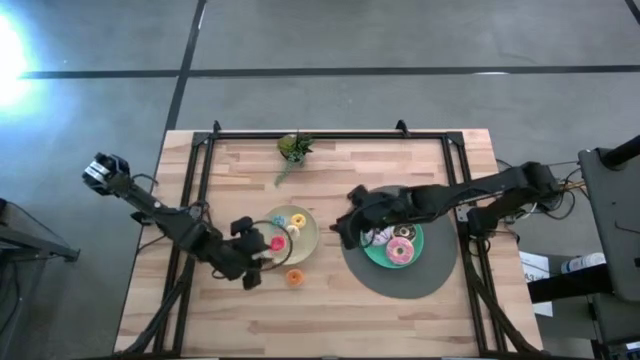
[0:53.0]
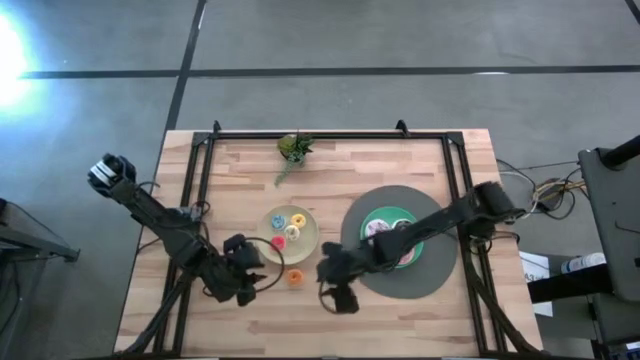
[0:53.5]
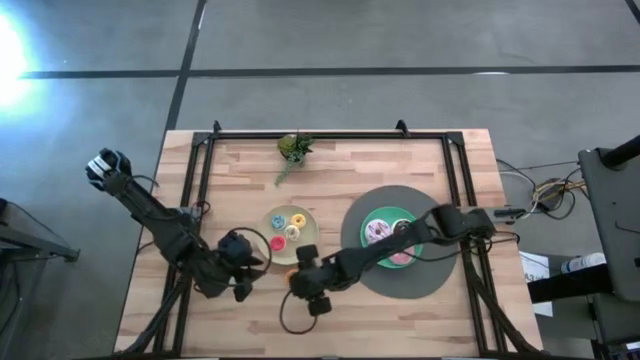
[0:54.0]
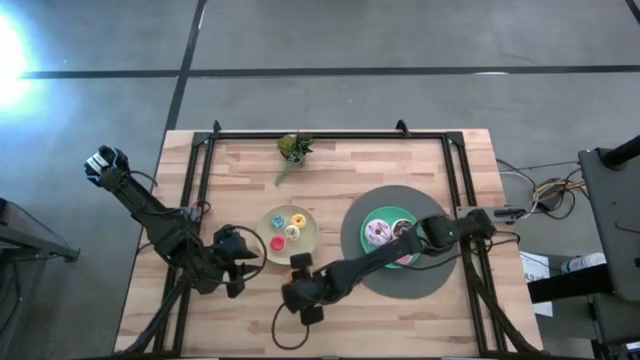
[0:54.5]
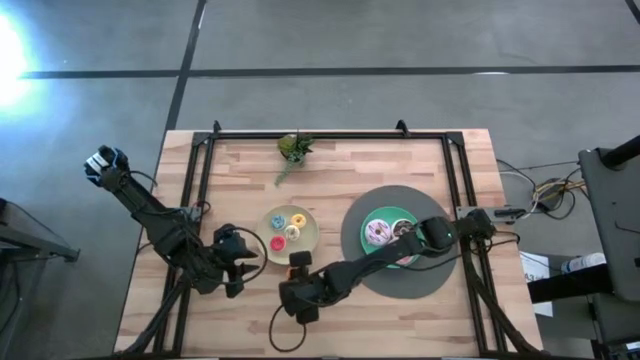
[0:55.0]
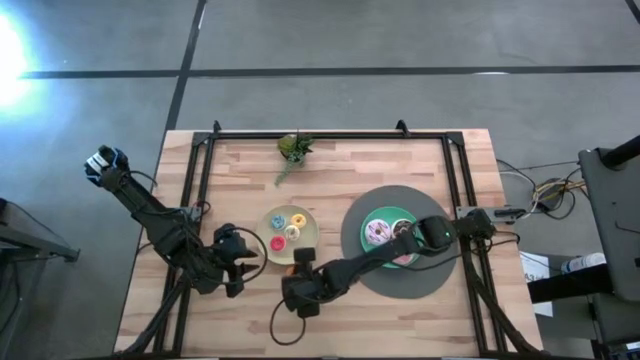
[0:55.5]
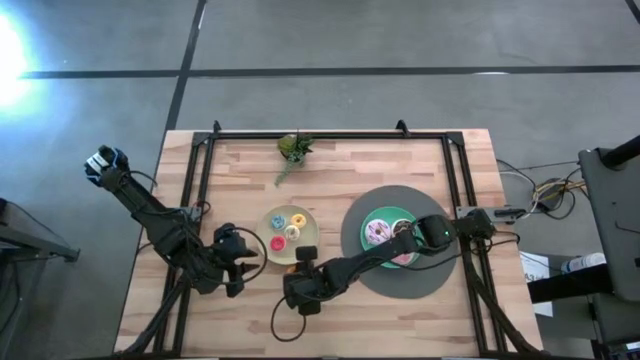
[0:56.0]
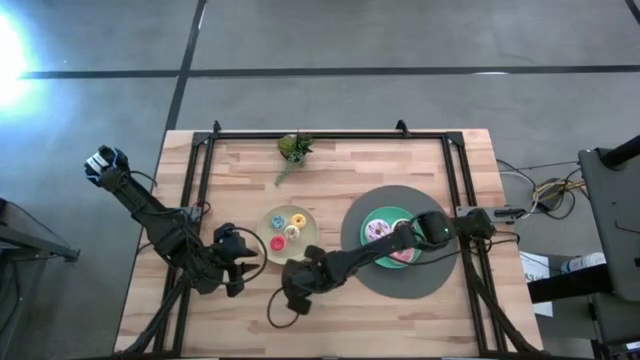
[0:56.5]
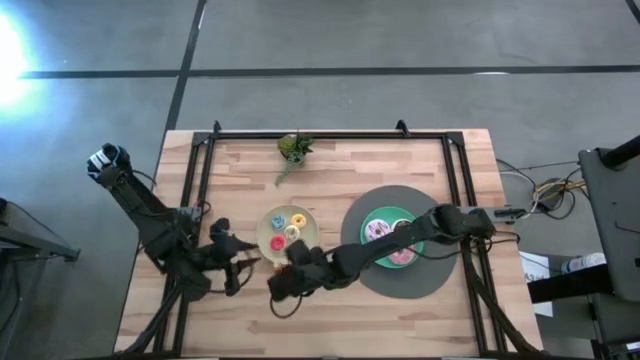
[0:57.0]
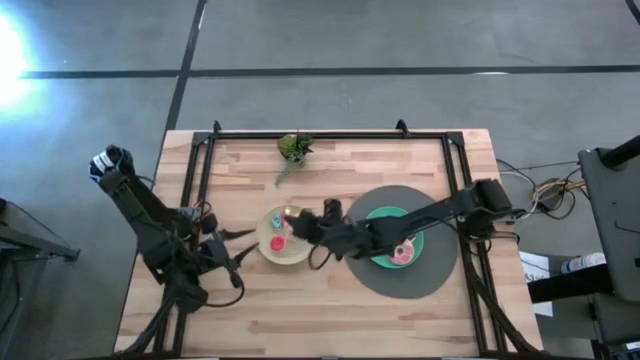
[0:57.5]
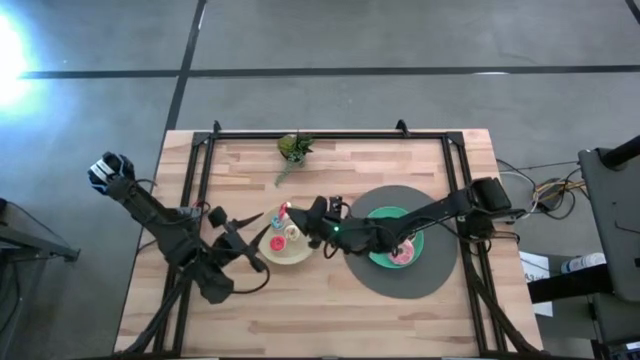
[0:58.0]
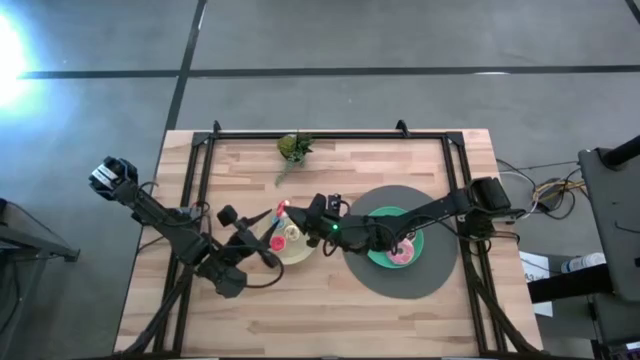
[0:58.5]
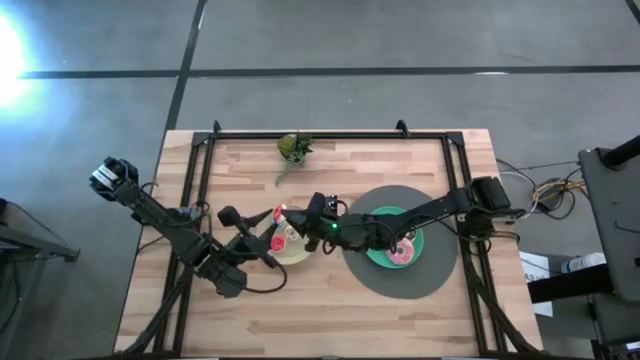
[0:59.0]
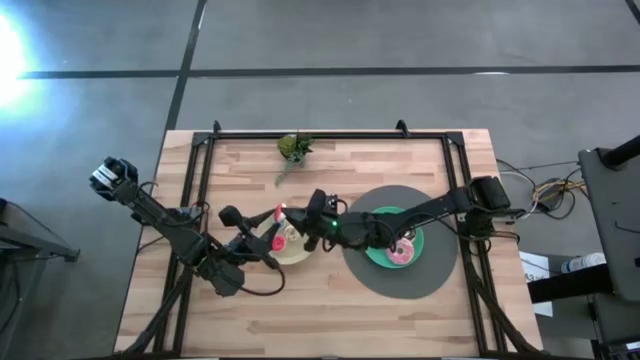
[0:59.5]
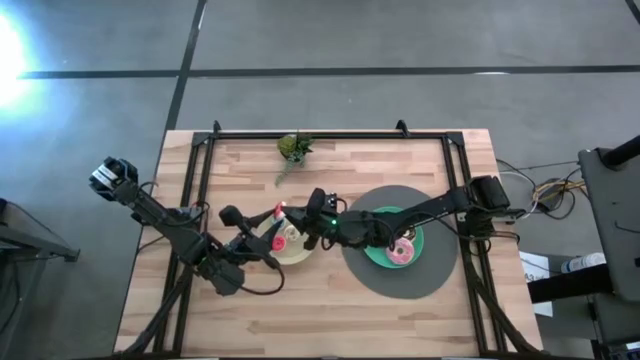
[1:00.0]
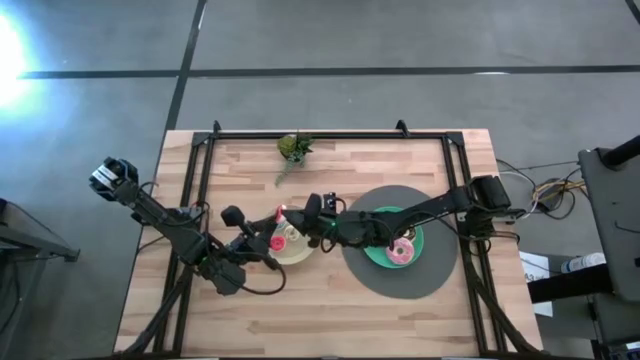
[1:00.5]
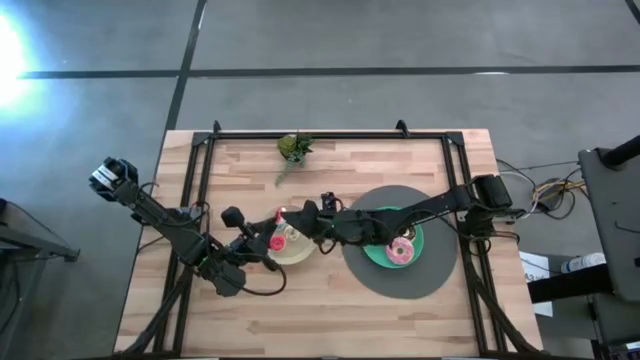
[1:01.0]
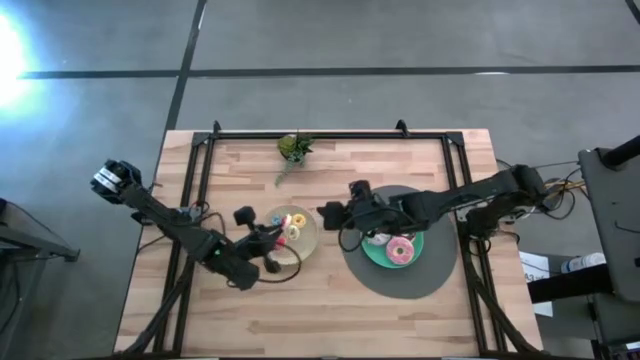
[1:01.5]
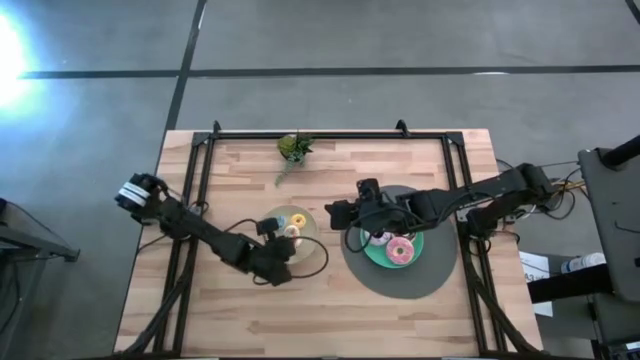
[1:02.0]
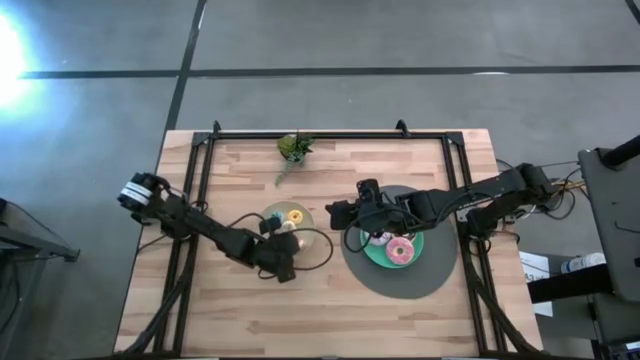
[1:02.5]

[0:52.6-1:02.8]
Task: Pick & Place donuts
Put the small orange donut on the white plate

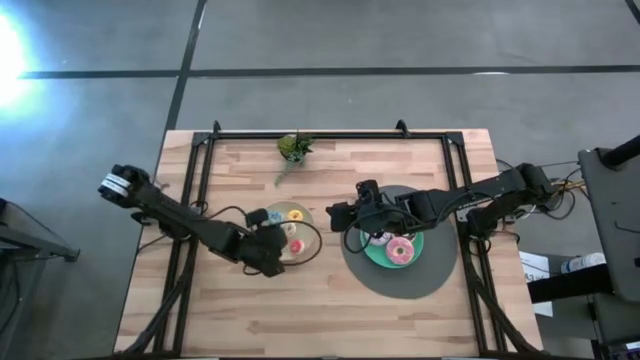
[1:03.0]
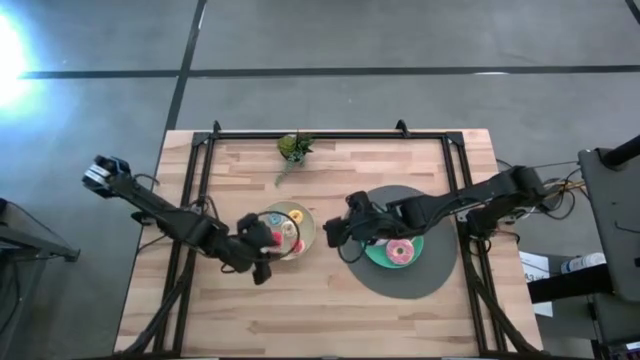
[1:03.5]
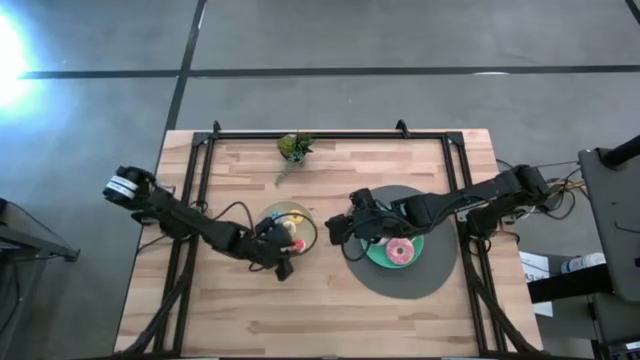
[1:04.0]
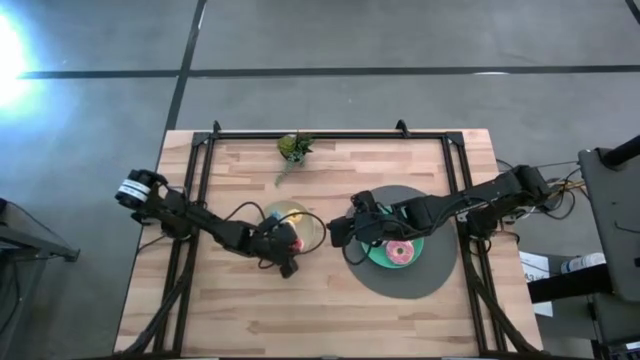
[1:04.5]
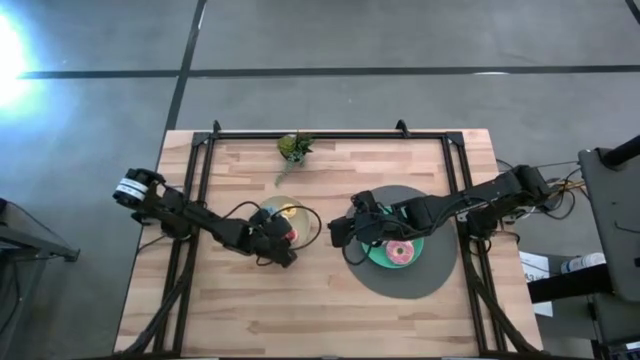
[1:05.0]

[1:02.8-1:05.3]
Adjust the small donuts

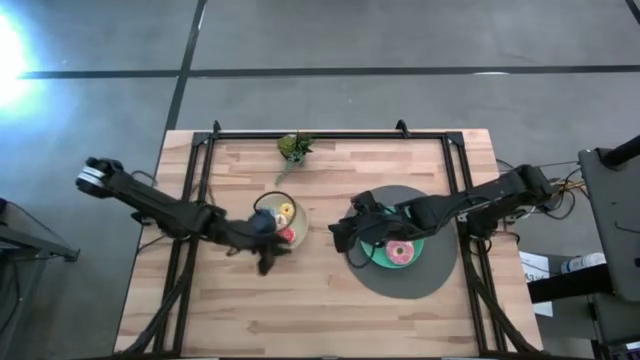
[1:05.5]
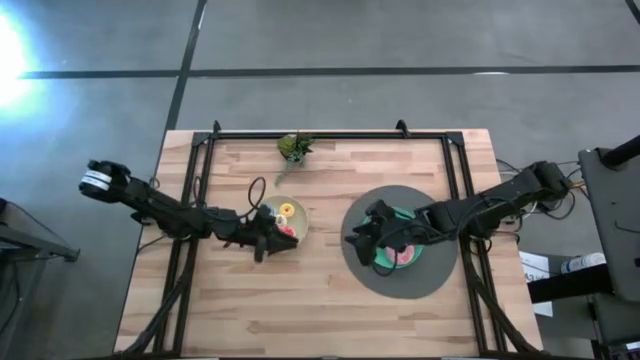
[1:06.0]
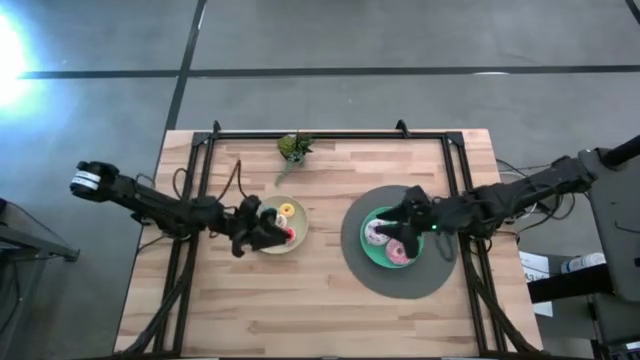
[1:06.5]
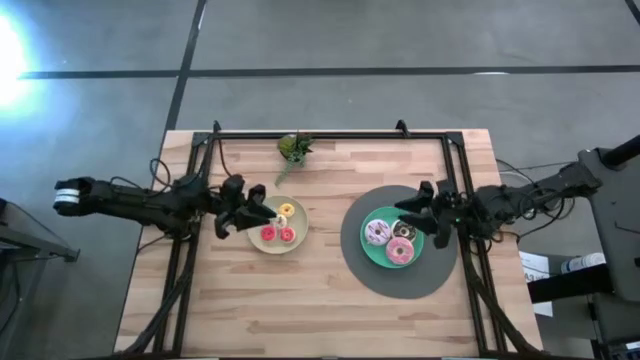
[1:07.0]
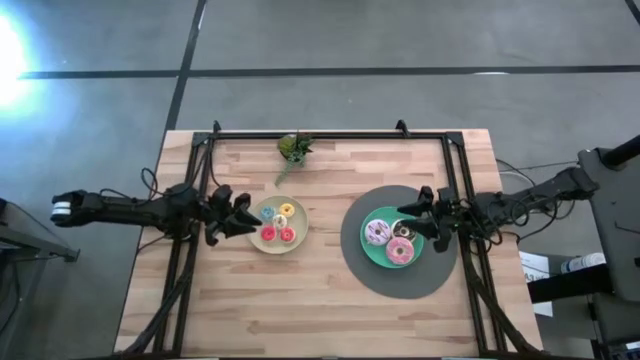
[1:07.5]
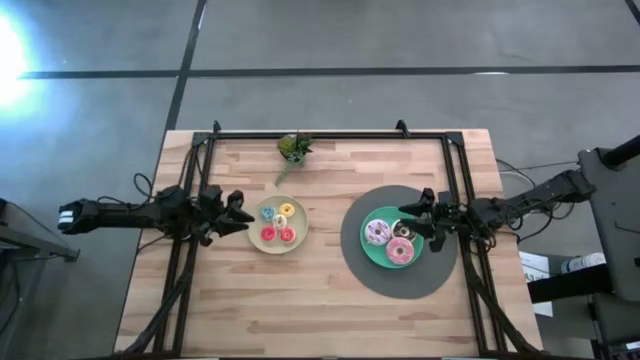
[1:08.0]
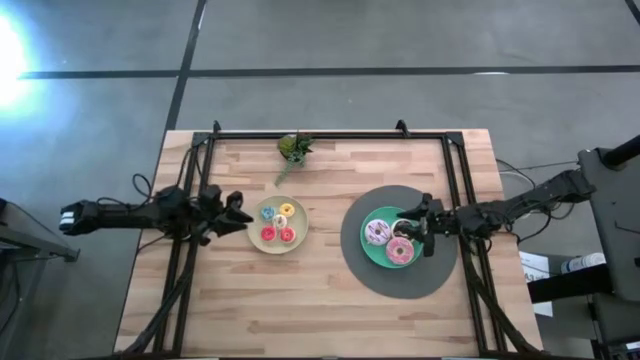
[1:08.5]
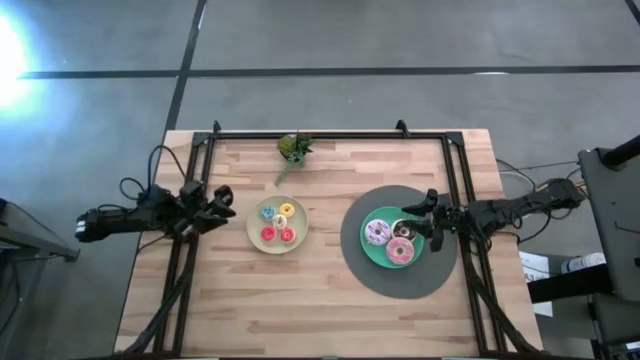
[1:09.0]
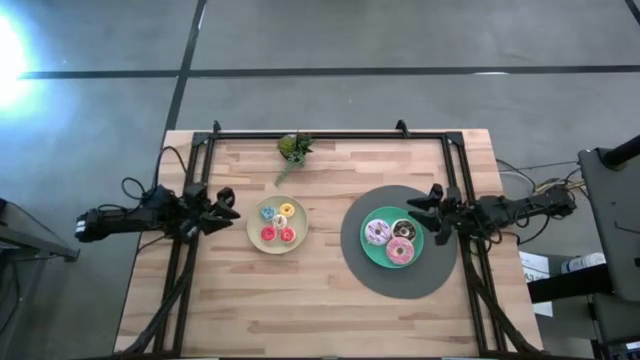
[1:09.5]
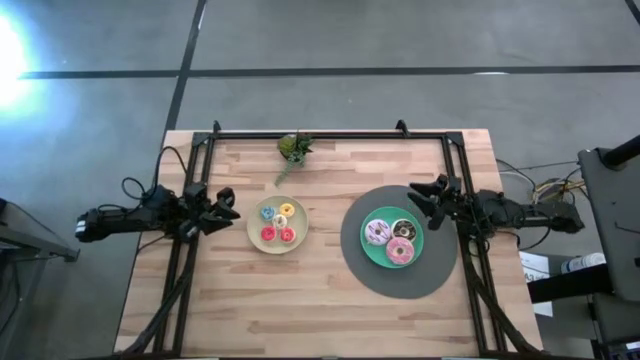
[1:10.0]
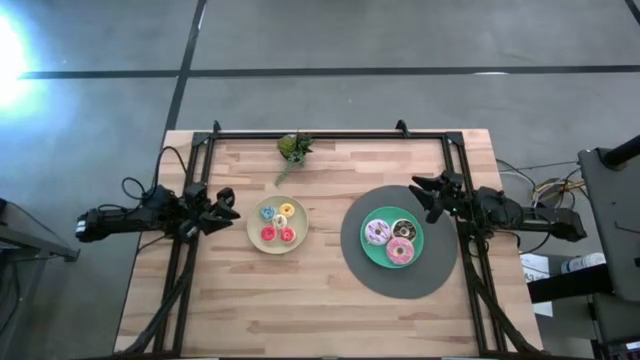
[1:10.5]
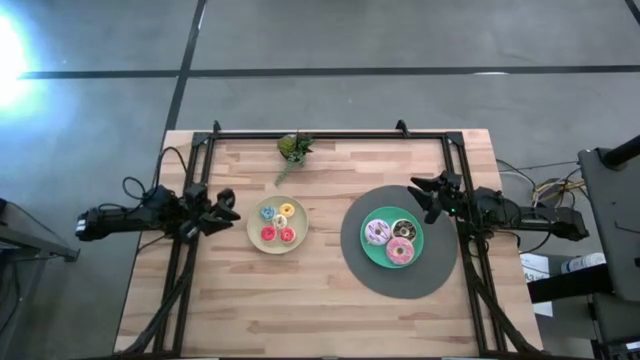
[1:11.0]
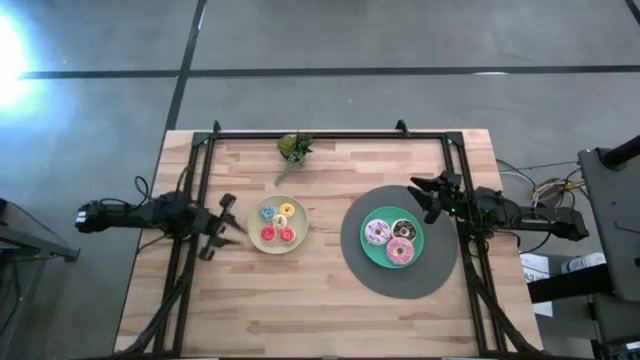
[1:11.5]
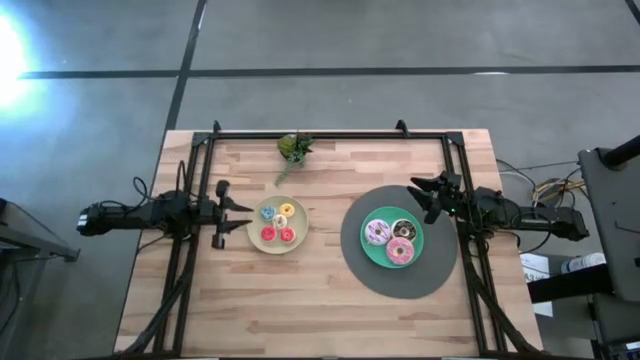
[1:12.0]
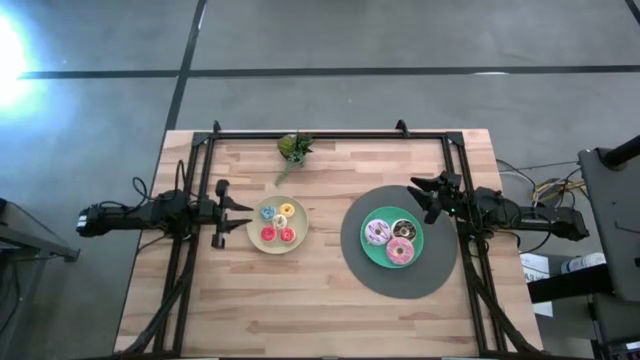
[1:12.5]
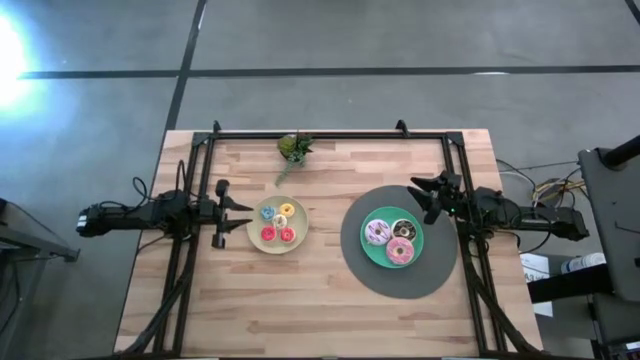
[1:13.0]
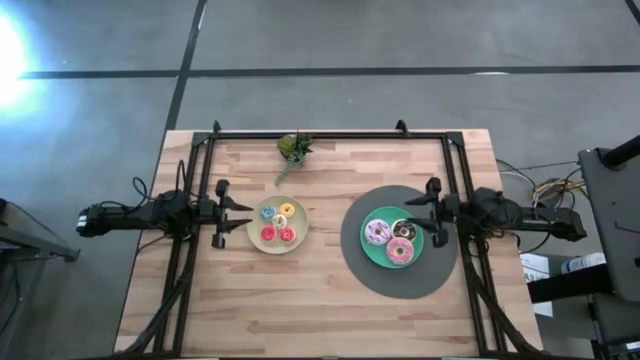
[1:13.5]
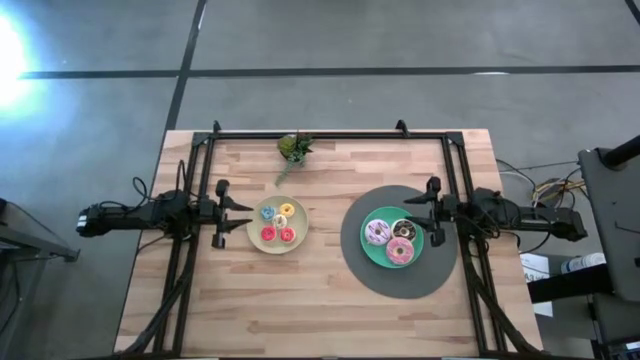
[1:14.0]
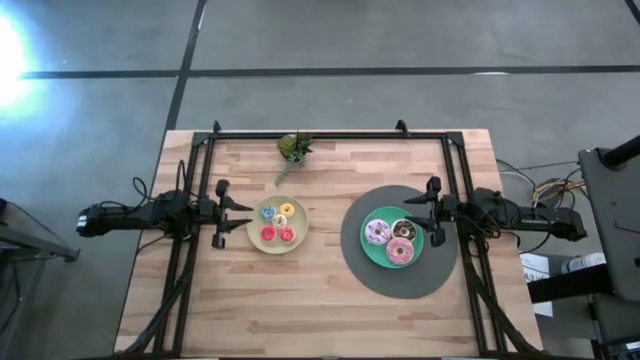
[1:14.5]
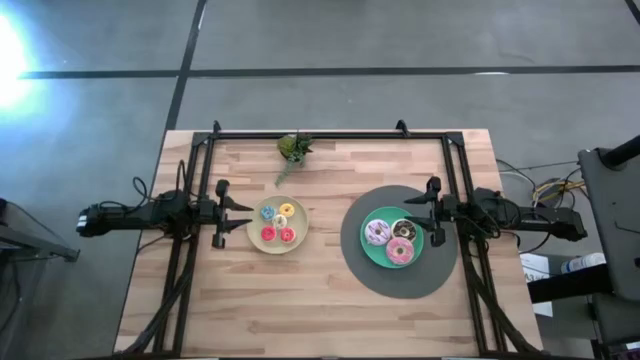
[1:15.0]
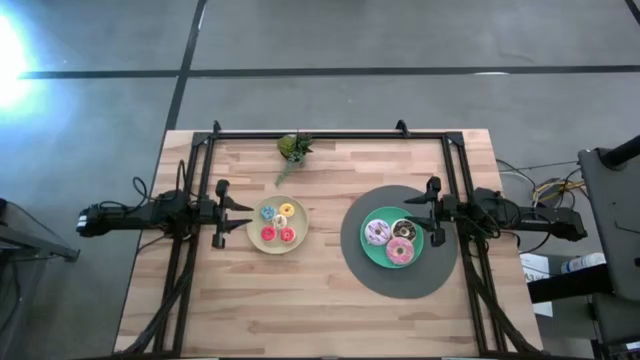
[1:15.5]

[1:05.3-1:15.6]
Return to Home Position
